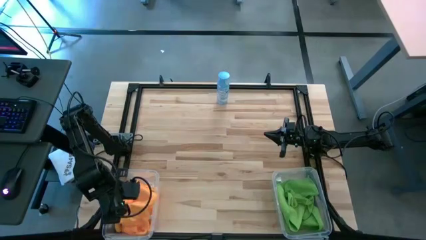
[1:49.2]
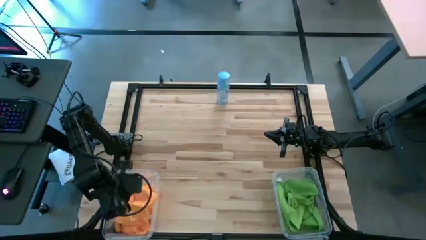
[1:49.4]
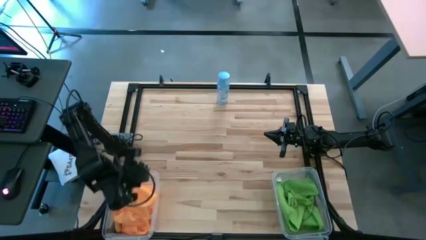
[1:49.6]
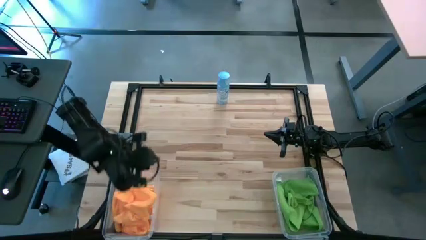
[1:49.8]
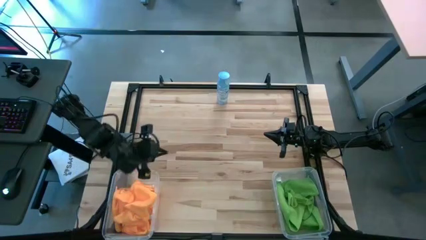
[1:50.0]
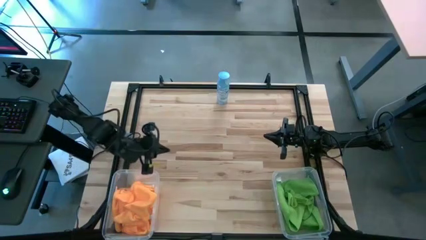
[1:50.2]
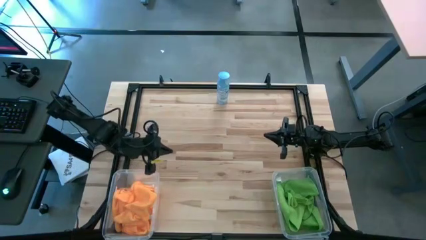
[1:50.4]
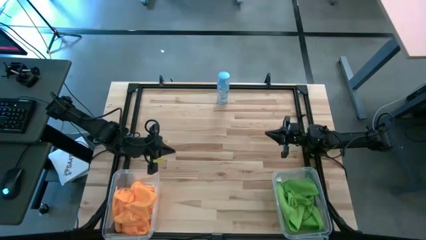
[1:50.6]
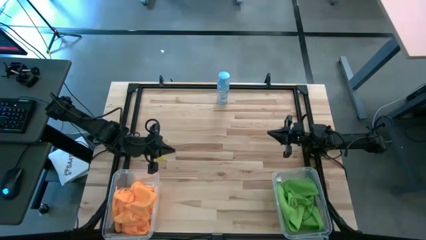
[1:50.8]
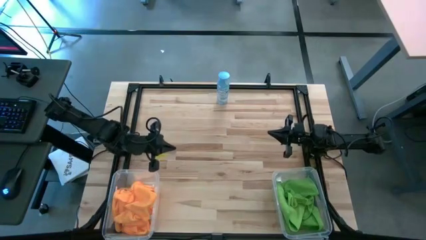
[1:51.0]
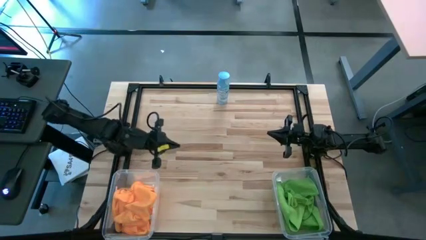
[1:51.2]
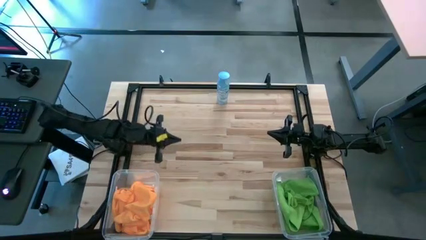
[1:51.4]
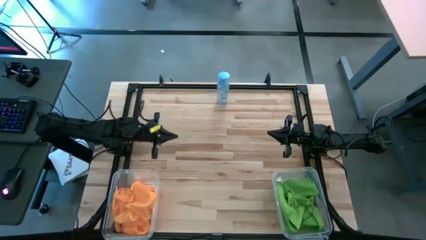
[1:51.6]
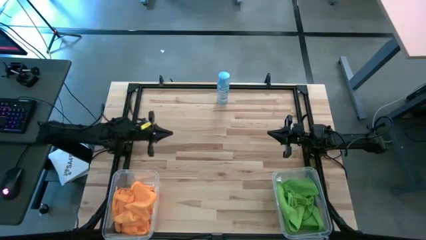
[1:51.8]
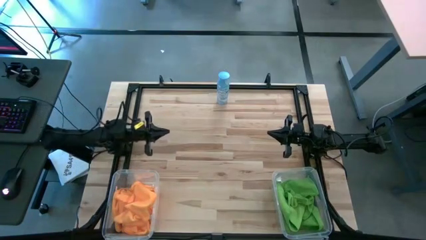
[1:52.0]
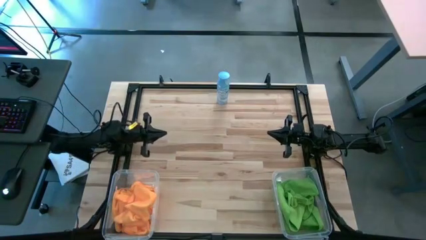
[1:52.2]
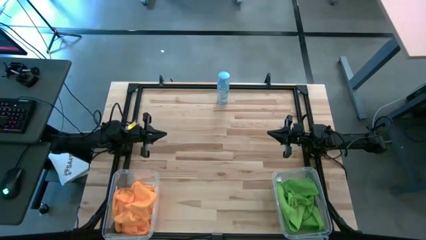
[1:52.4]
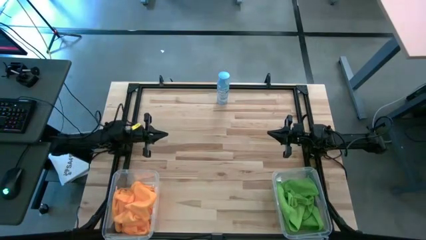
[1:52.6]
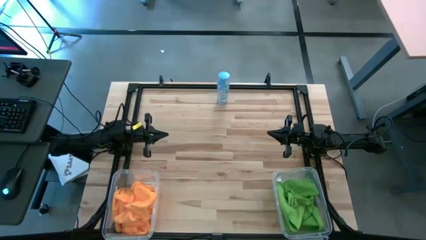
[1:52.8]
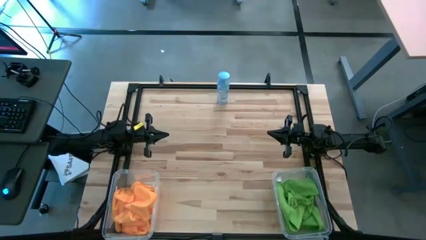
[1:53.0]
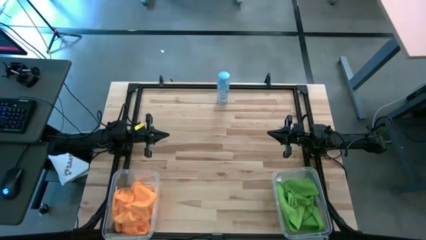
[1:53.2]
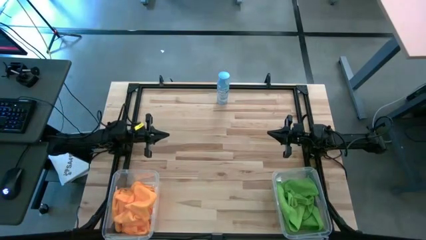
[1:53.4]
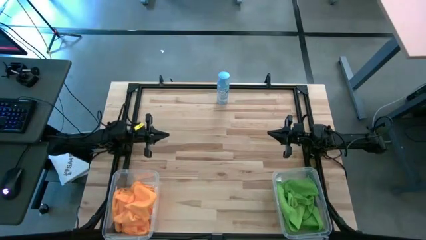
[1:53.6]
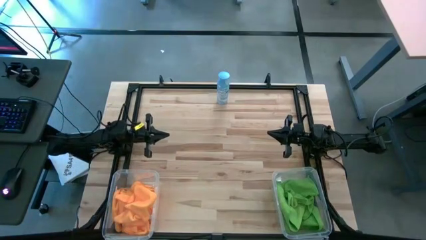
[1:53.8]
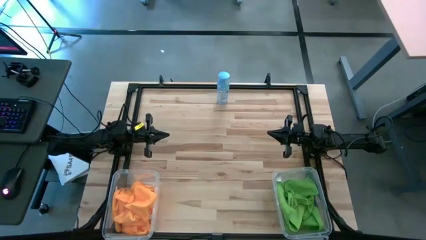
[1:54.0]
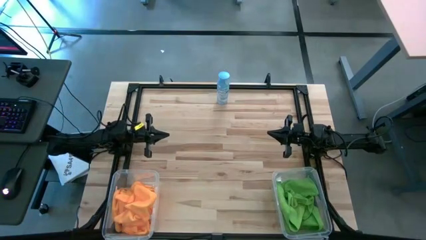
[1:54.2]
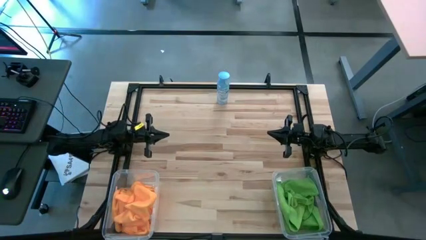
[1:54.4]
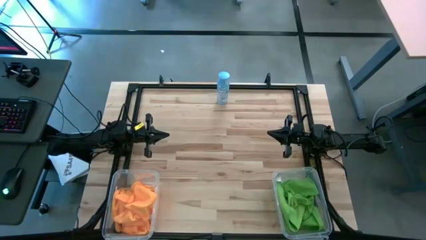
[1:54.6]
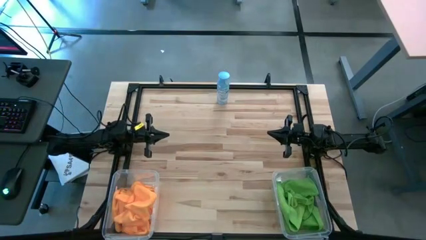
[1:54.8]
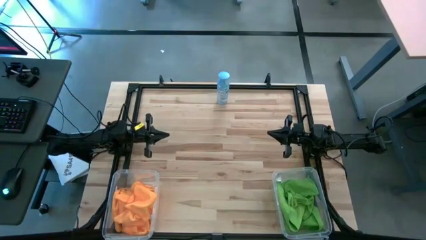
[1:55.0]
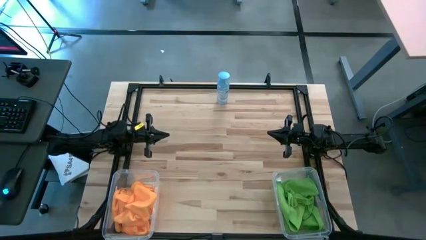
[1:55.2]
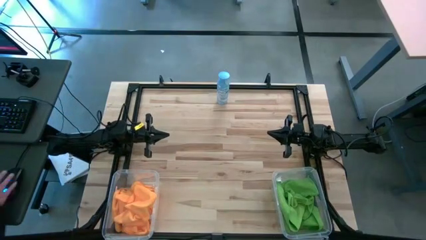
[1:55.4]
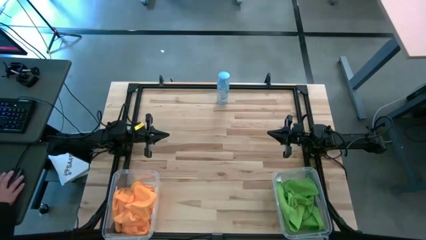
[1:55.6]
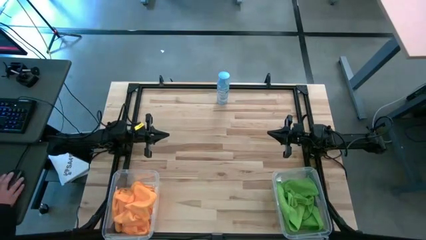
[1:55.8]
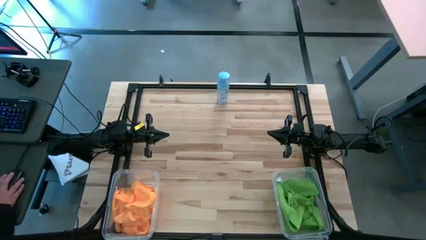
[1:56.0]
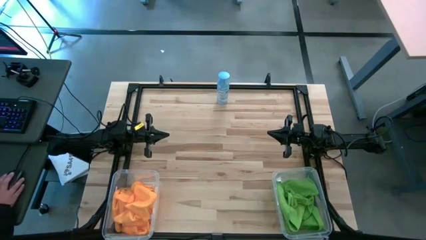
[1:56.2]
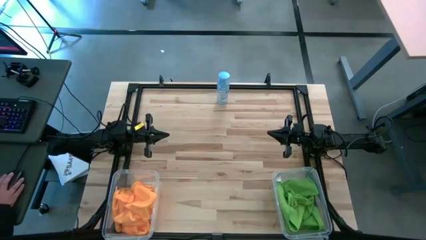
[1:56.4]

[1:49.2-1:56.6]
Task: Sort microfiber towel by color & place in baskets
Return to Home Position

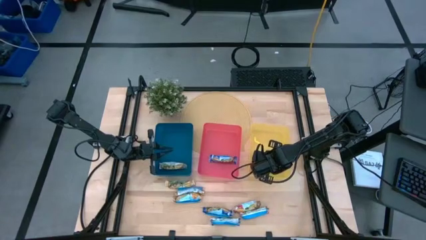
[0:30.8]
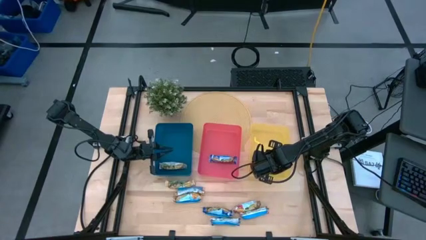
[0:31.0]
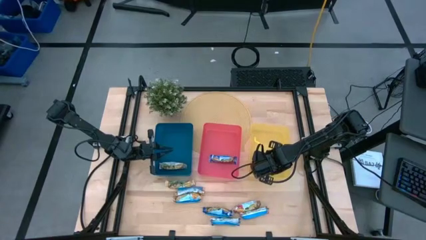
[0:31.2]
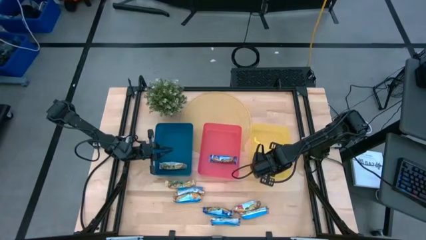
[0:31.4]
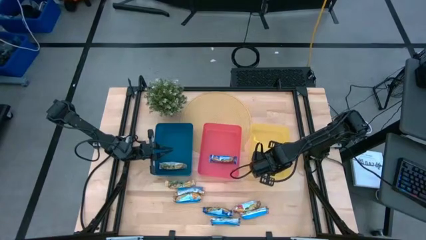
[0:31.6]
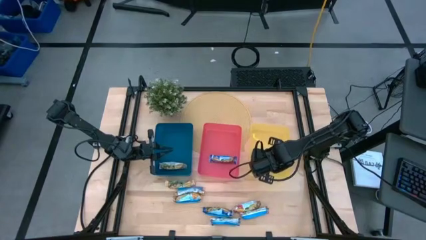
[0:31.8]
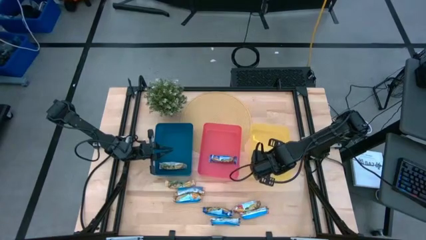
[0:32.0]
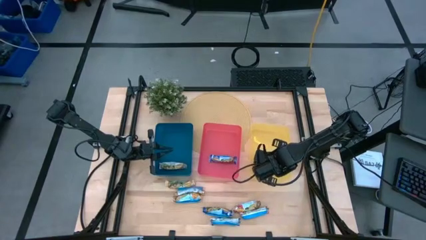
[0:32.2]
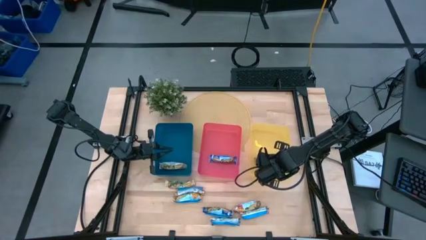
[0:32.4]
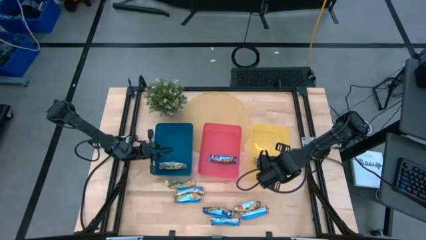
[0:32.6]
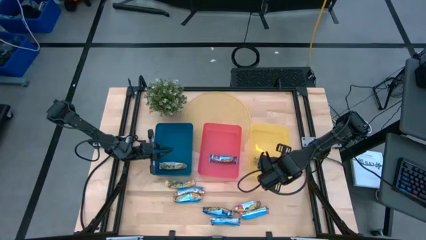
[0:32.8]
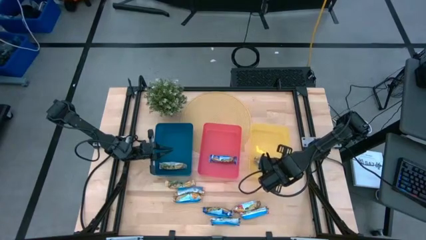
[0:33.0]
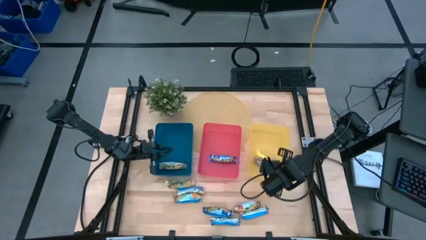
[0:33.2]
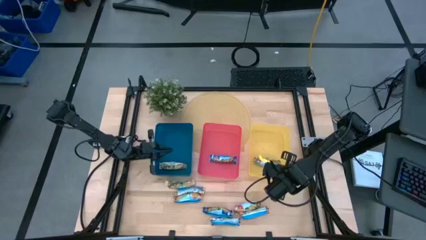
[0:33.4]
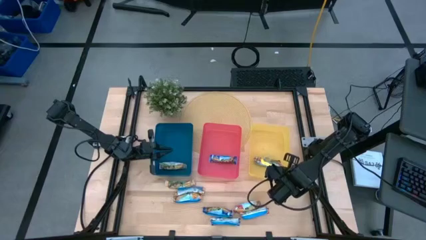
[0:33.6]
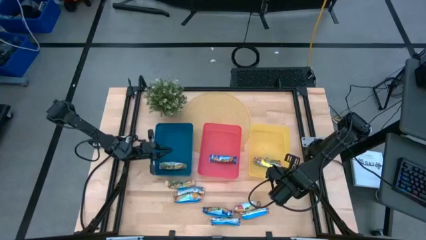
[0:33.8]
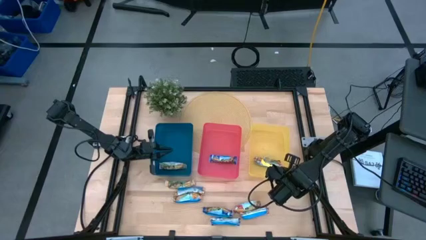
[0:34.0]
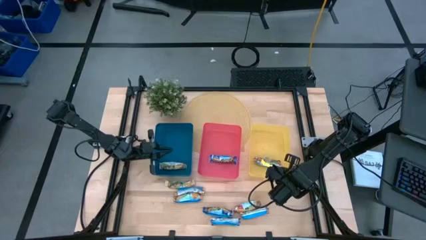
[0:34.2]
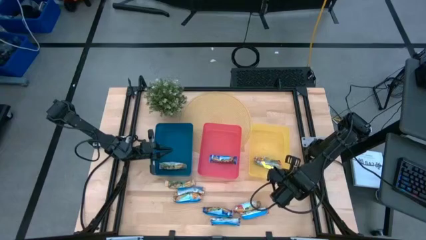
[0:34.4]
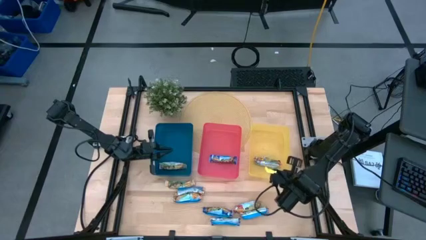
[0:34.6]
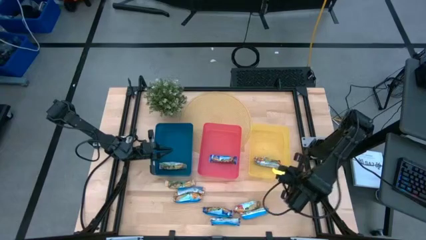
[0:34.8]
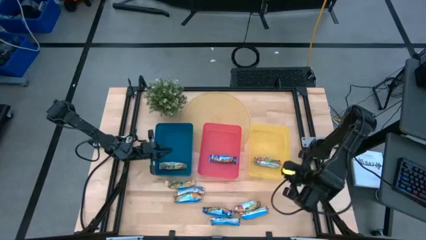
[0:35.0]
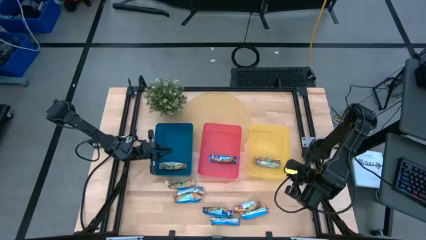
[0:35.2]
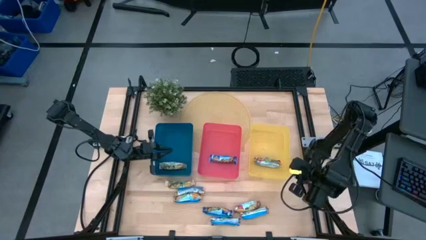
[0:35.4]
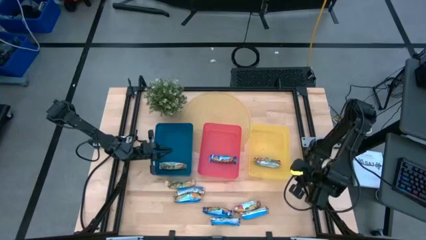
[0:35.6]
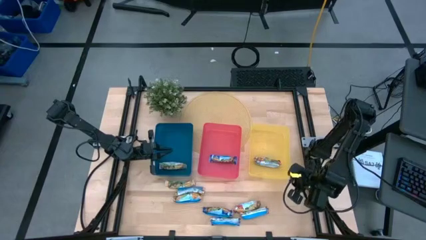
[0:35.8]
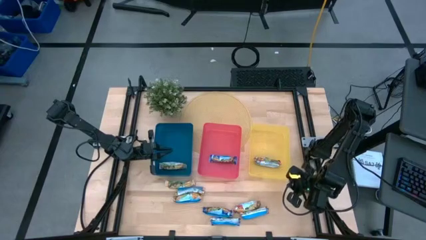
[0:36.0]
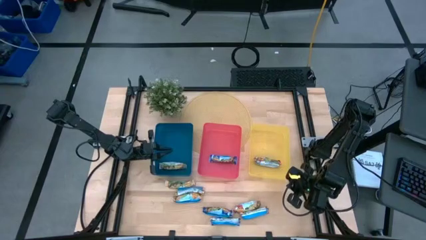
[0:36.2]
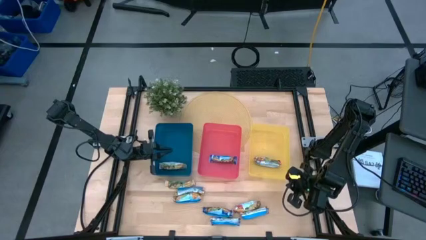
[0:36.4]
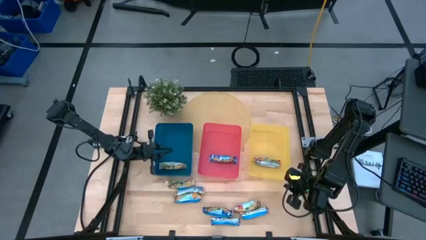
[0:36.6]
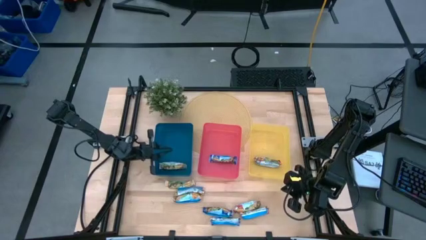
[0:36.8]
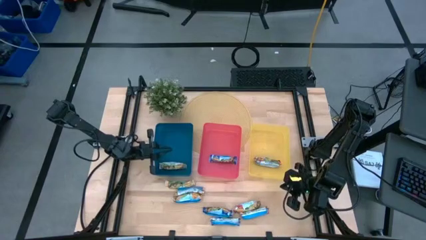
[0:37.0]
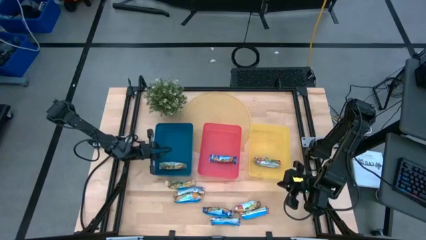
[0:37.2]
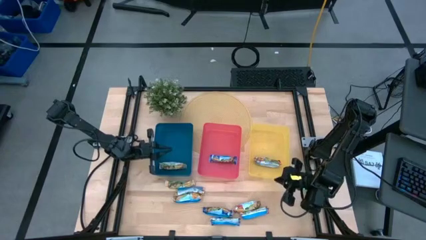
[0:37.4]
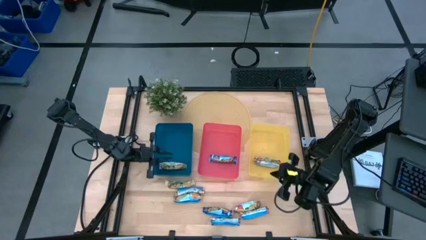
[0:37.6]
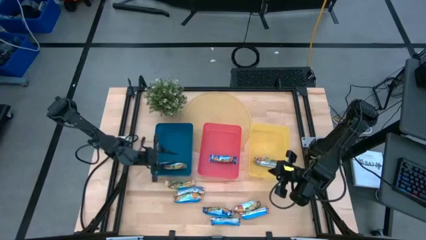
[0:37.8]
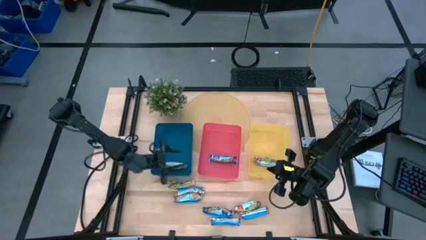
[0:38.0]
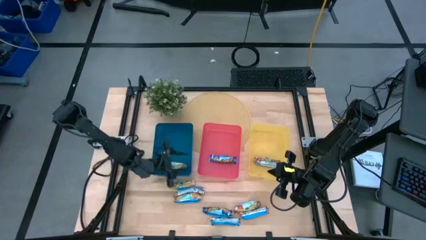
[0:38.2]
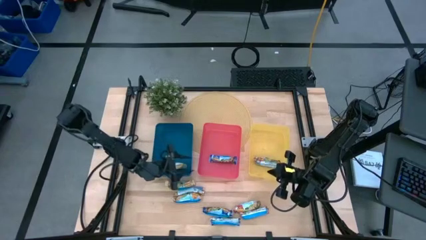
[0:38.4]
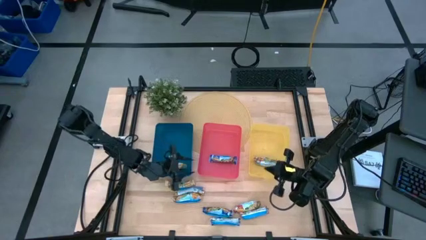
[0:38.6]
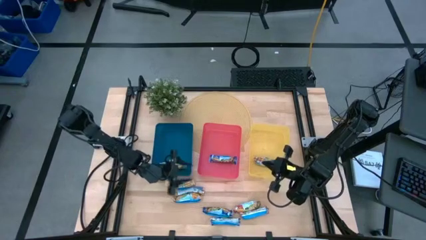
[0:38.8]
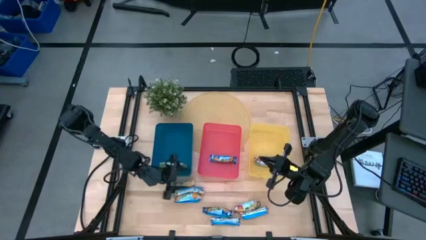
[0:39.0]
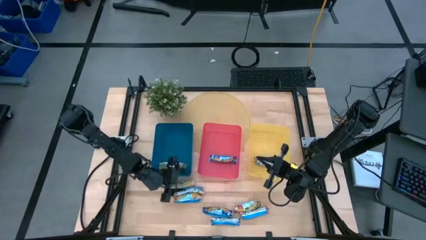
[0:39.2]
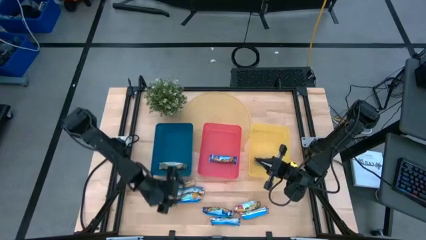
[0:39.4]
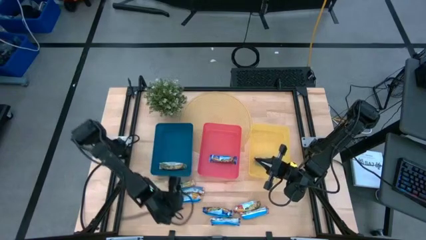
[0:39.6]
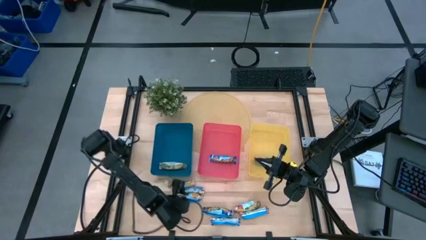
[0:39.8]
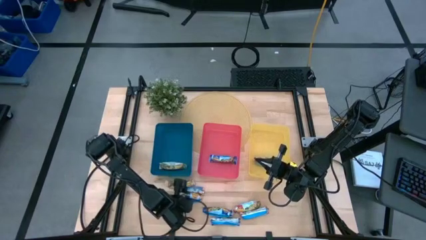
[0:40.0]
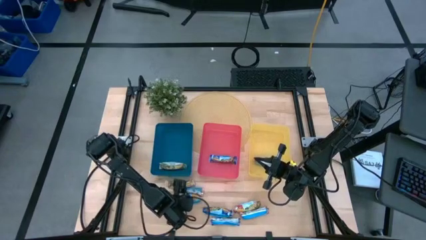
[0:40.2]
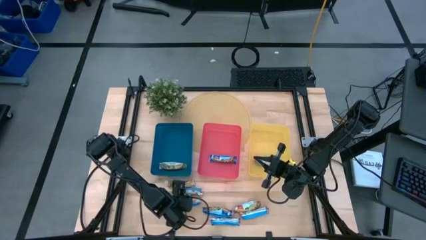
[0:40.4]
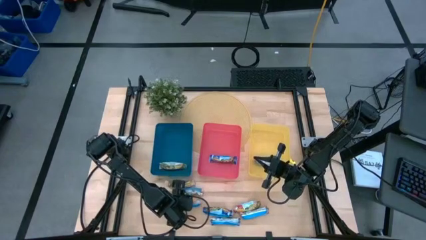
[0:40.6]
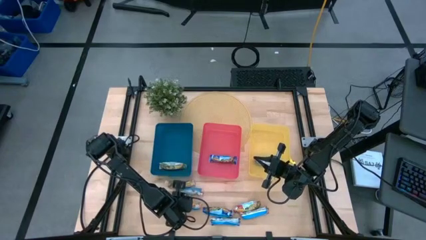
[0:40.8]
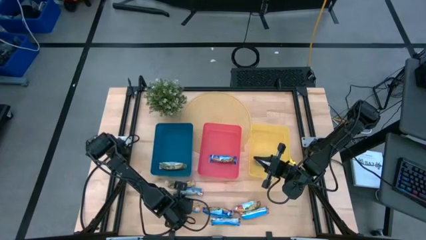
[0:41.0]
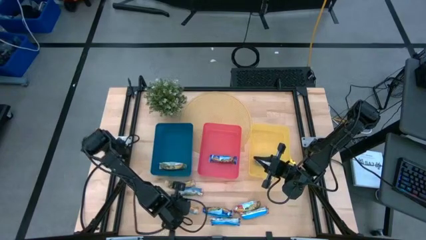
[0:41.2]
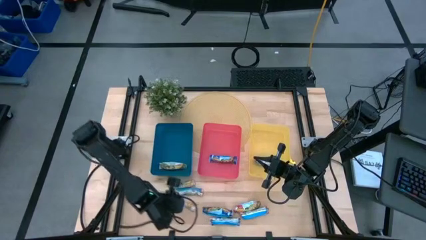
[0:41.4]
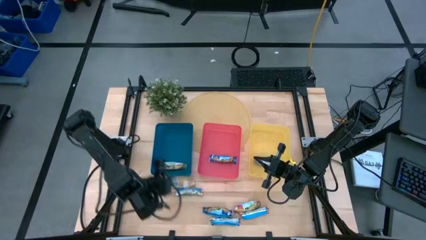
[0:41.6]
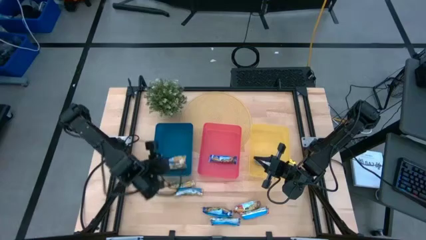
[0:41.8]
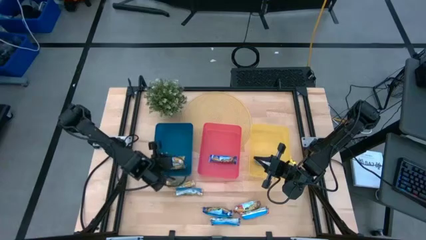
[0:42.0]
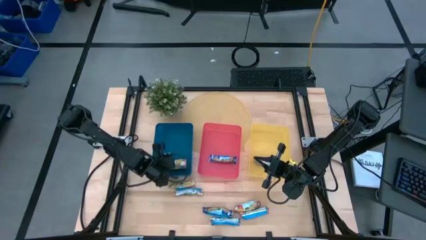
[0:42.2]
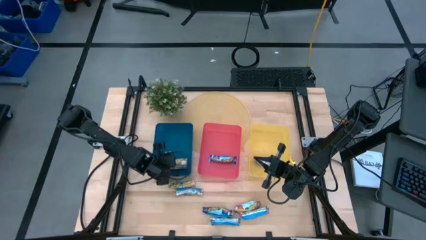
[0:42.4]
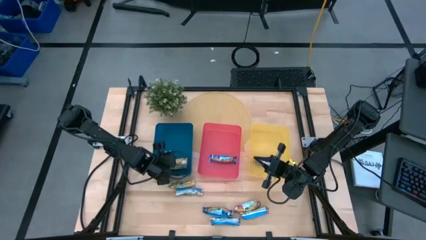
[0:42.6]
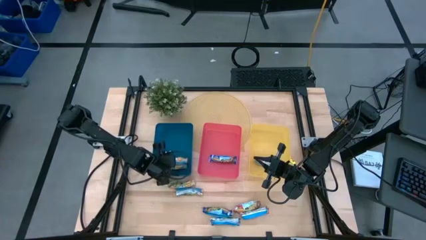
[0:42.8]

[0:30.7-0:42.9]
Task: Pick and place Granola Bars by type
Put the orange granola bar into the blue bin
